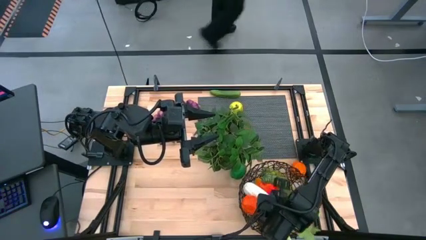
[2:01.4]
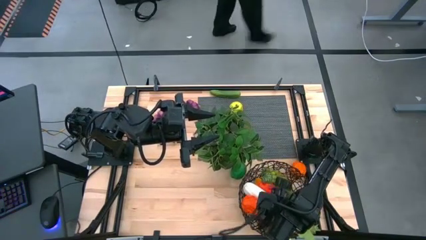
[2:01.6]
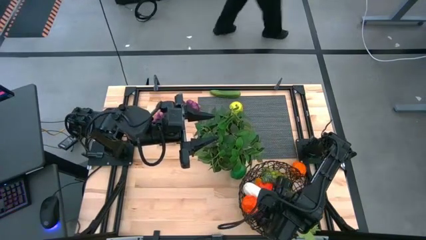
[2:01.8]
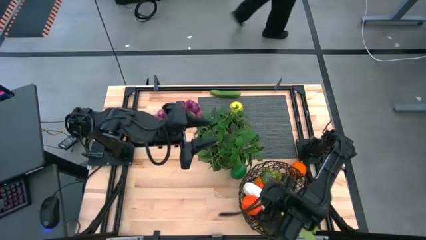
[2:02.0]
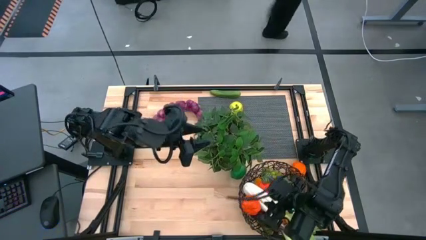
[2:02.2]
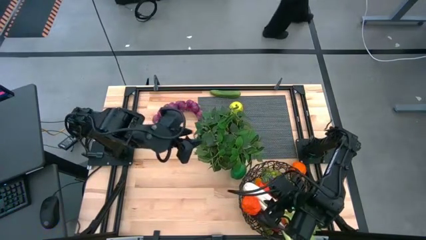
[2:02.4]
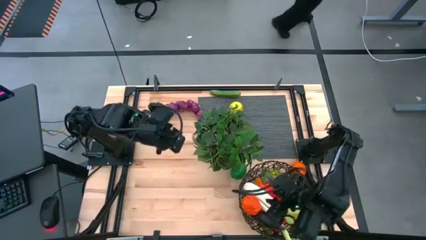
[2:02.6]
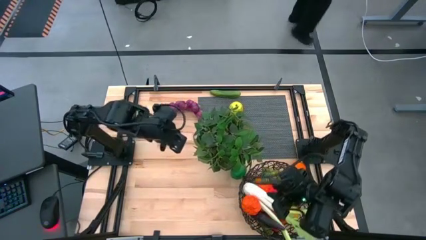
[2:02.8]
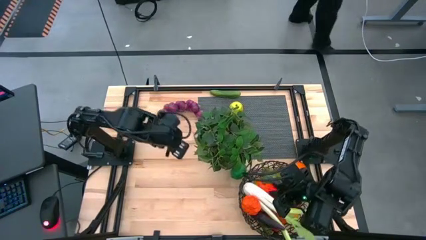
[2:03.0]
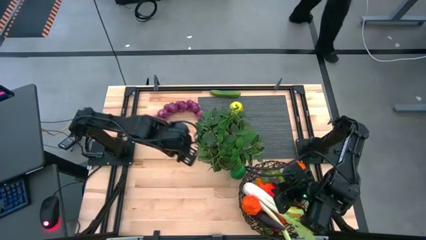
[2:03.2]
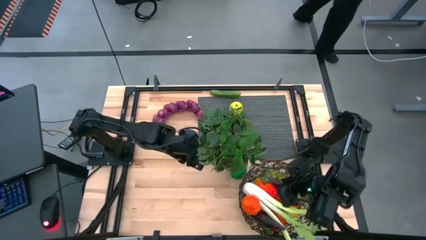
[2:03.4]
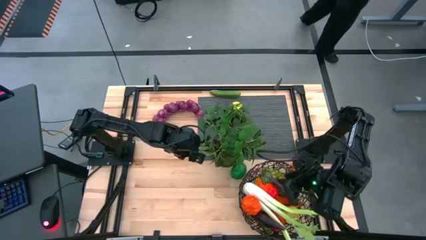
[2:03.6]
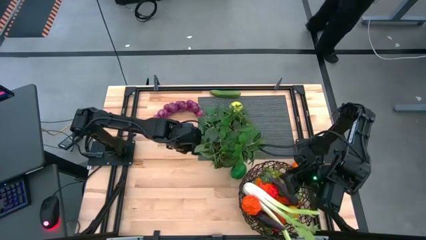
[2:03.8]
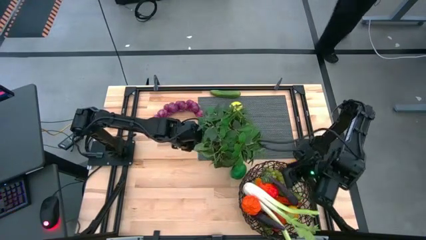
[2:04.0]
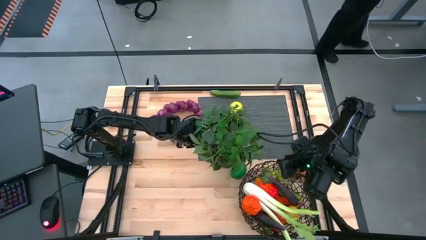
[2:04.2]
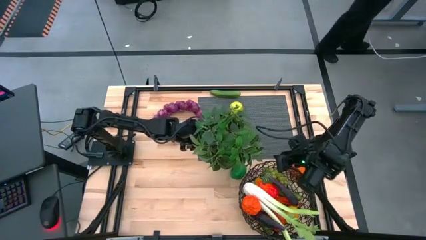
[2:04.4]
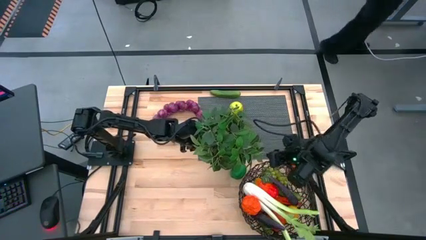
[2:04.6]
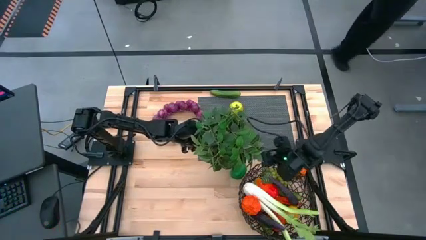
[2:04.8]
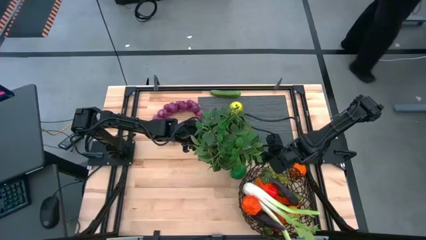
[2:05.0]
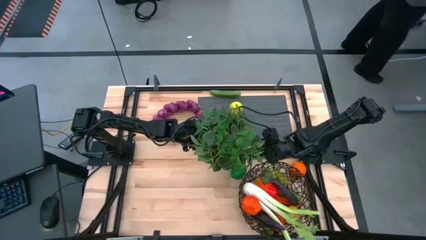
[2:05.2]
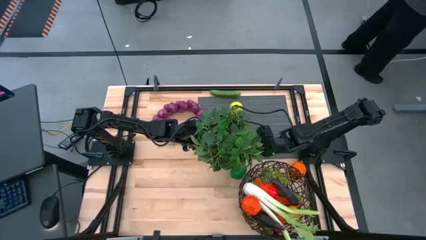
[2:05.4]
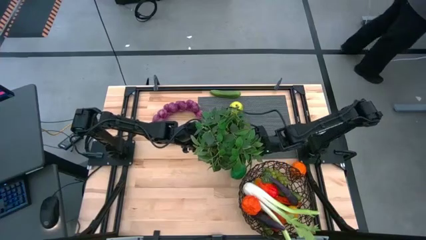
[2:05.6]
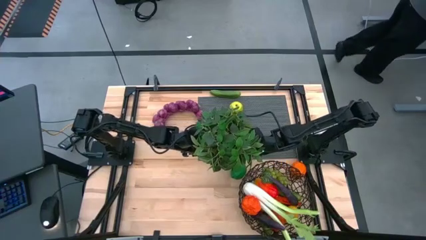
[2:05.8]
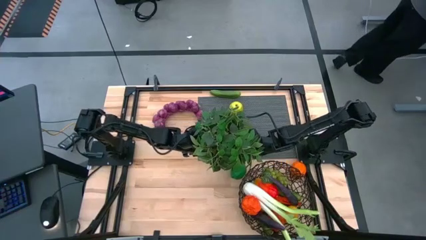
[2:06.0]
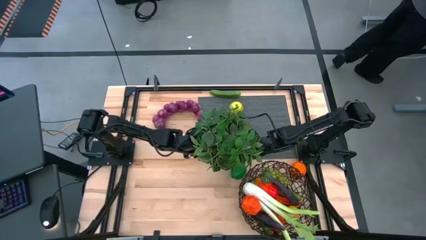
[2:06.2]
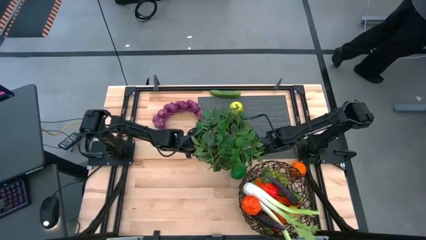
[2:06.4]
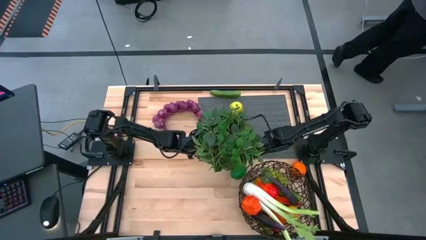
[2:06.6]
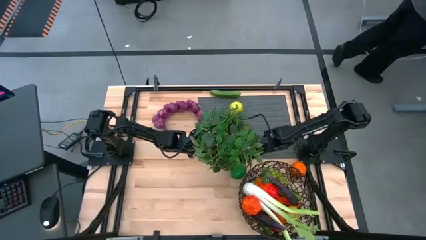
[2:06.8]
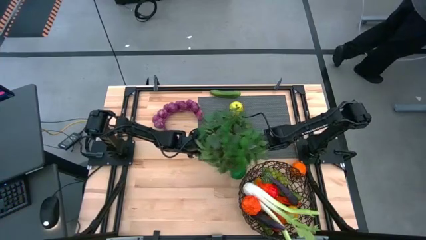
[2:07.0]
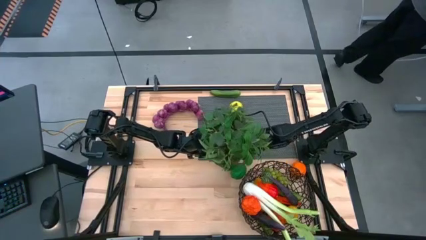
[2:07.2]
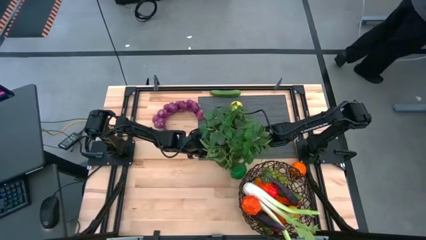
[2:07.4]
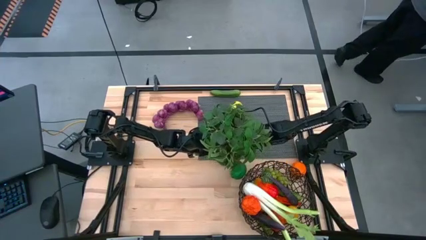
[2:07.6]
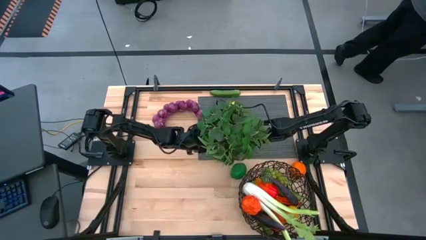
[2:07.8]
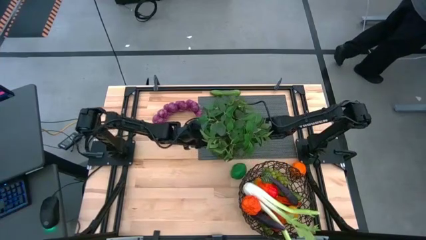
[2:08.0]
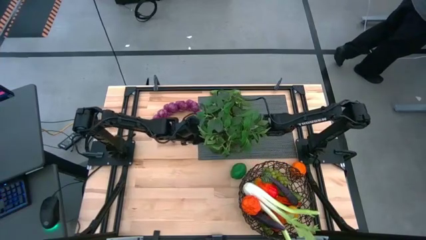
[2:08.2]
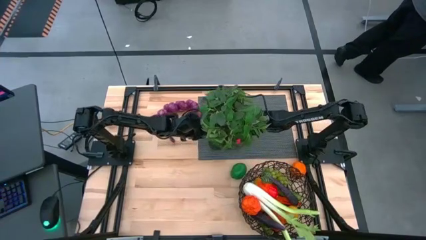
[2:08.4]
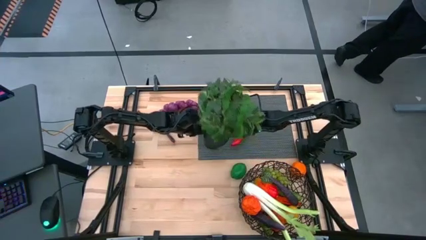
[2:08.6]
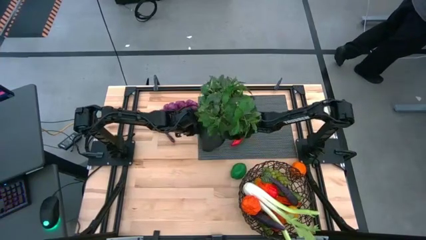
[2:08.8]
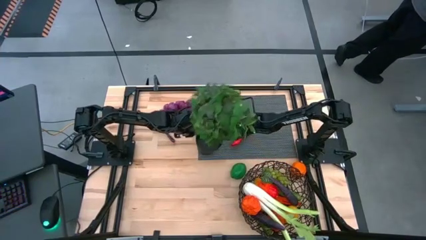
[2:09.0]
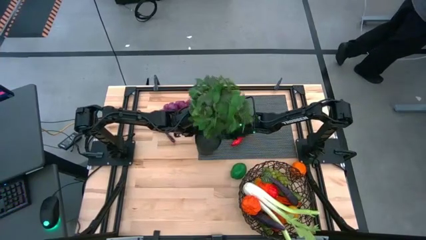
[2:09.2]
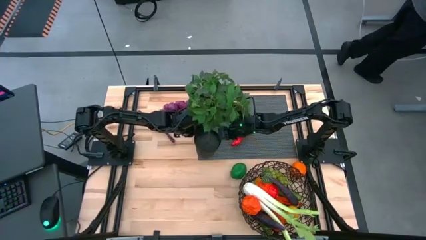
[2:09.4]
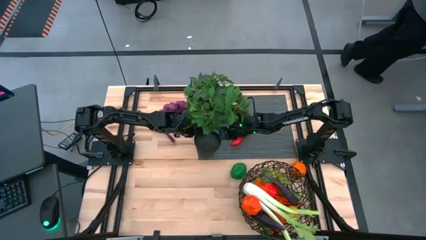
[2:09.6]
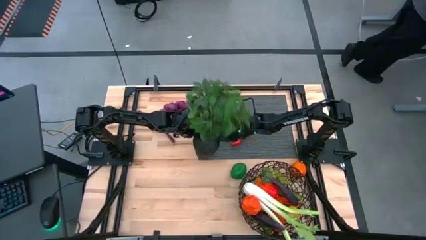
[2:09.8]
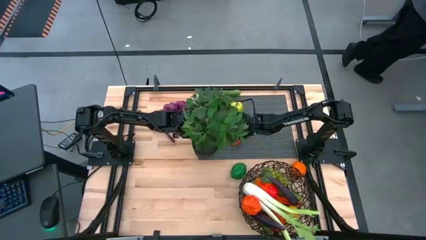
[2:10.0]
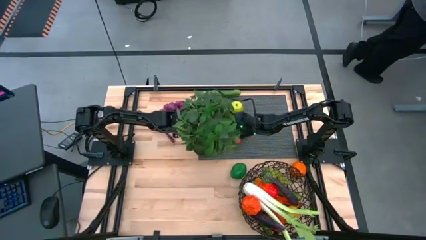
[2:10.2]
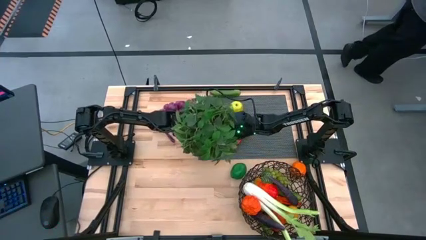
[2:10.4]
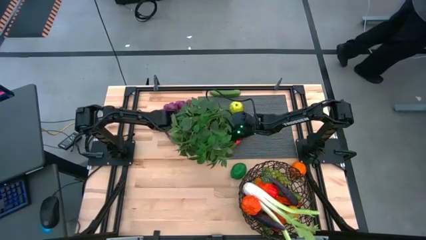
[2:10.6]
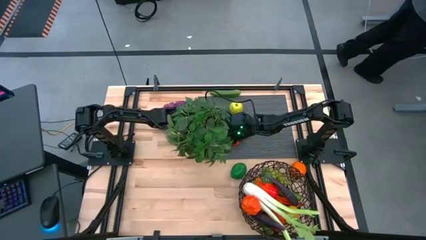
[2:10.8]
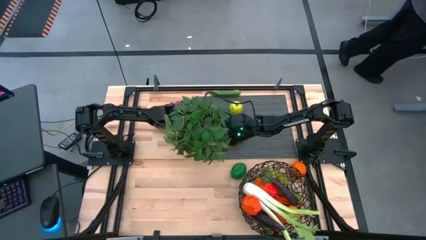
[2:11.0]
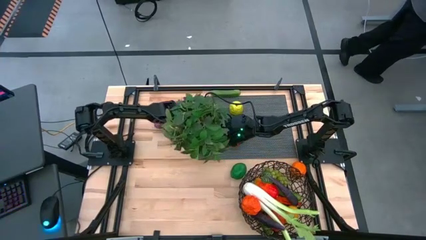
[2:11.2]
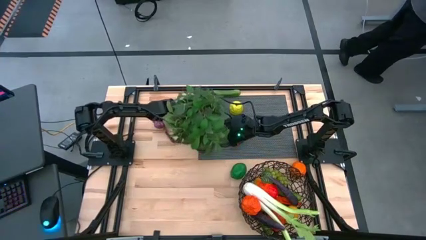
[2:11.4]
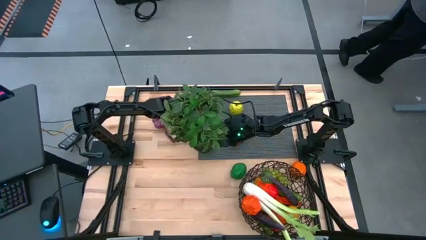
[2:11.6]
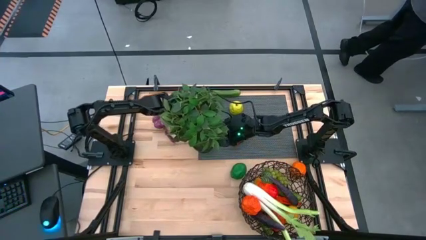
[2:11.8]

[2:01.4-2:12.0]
Task: Build produce basket
Move the pot plant to the center of the table

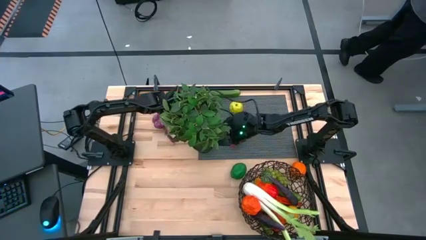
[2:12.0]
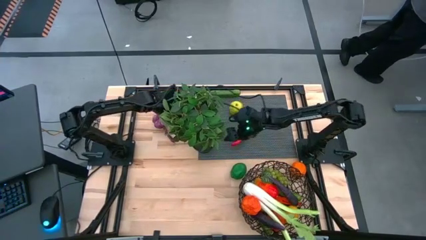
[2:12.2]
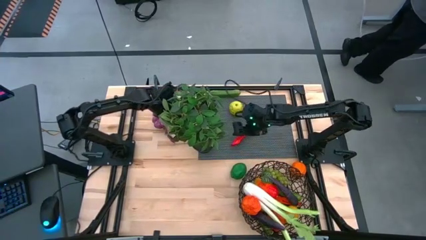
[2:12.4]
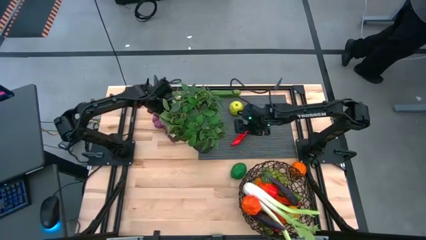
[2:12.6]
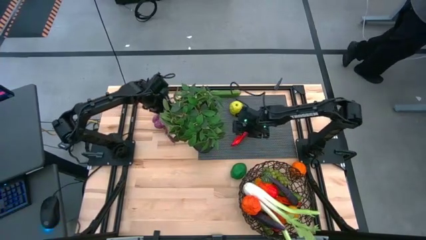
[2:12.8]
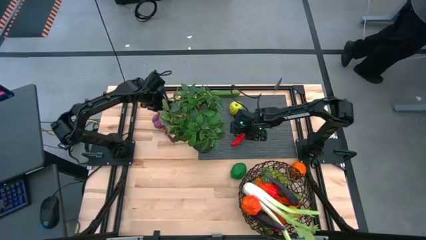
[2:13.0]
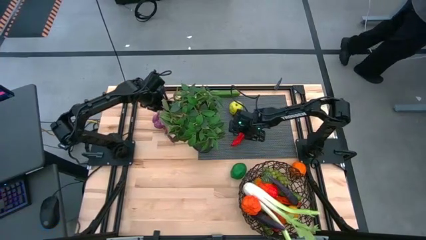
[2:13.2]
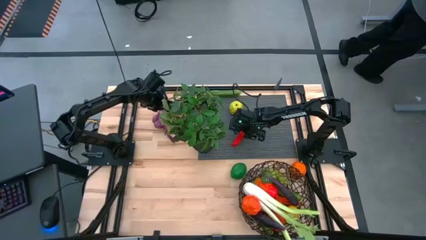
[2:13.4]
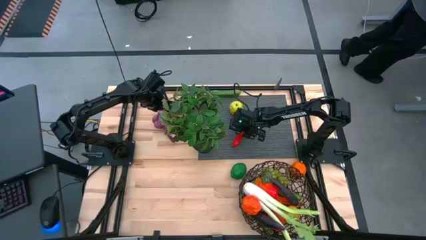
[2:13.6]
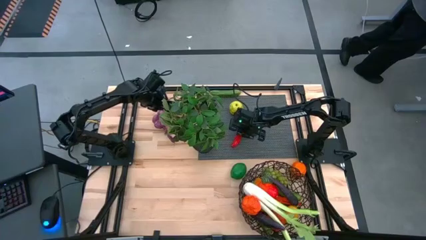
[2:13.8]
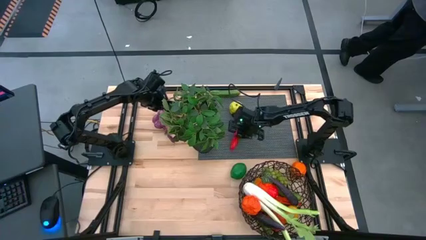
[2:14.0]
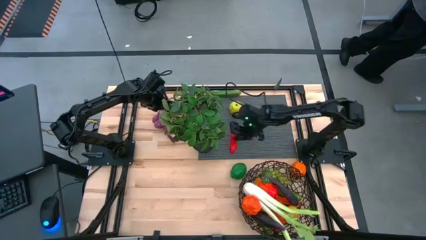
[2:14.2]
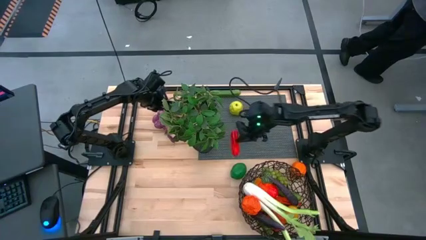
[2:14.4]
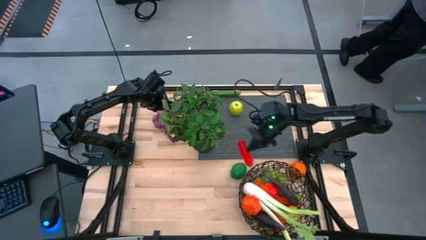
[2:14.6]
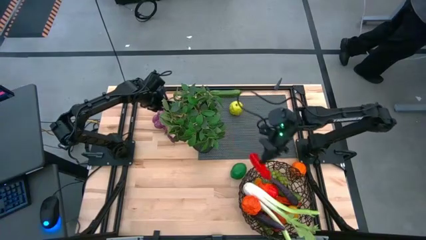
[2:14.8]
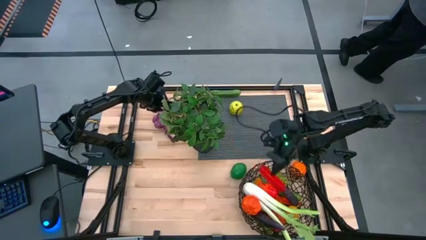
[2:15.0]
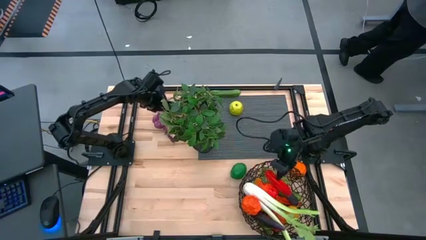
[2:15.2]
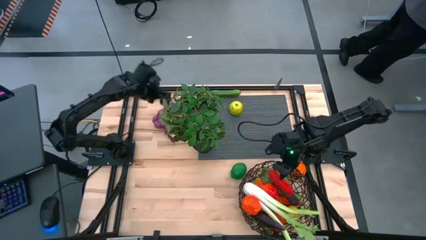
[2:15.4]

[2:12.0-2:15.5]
Put the red chili pepper into the brown wire basket

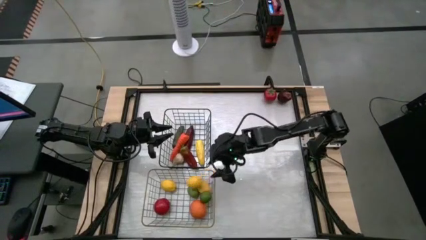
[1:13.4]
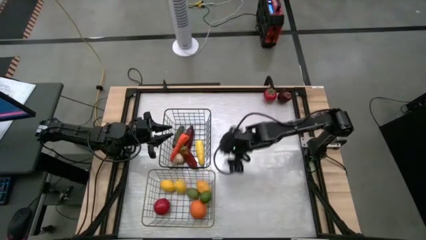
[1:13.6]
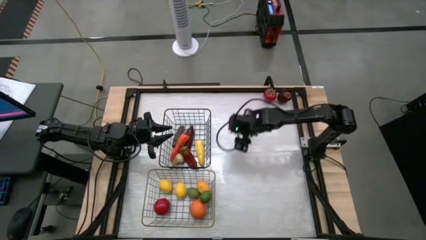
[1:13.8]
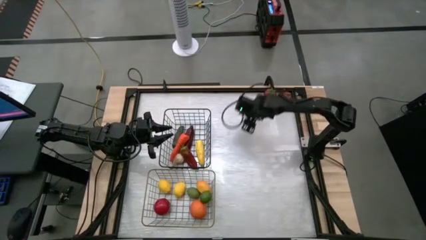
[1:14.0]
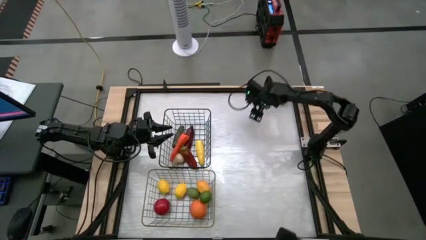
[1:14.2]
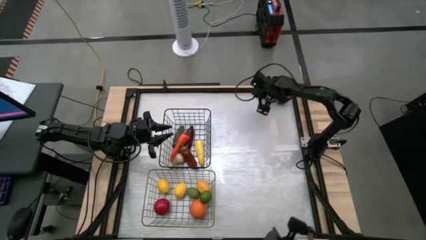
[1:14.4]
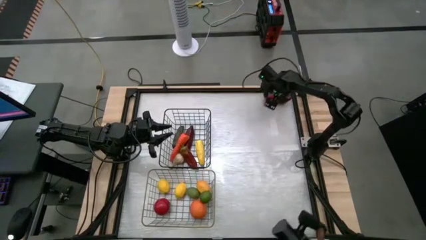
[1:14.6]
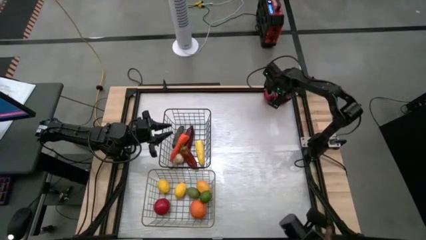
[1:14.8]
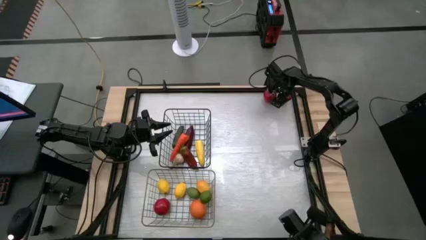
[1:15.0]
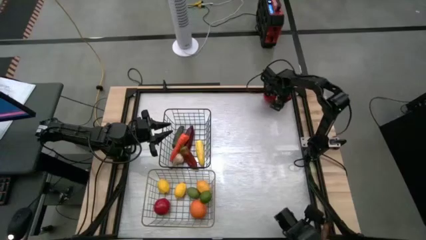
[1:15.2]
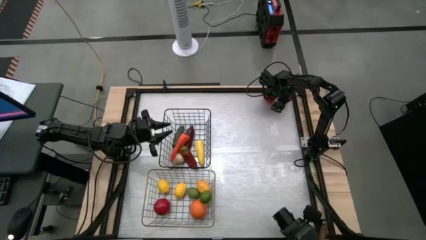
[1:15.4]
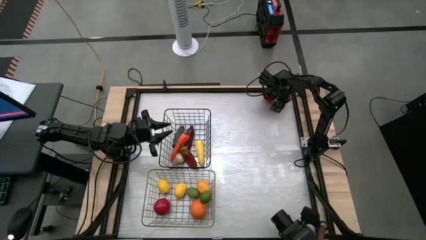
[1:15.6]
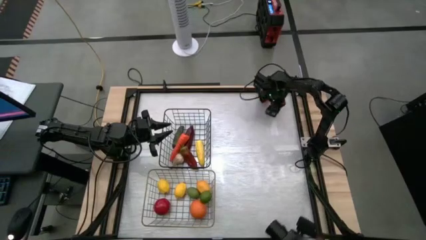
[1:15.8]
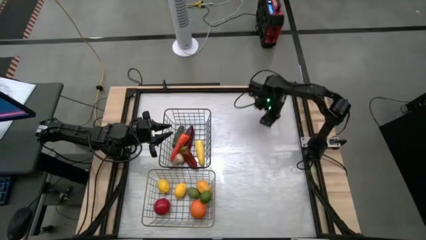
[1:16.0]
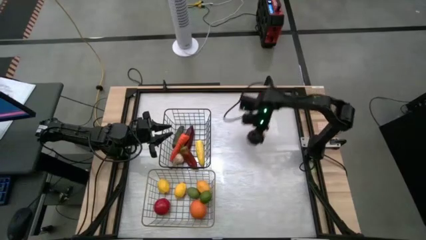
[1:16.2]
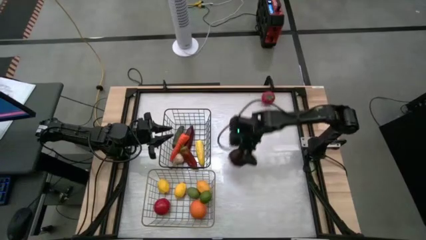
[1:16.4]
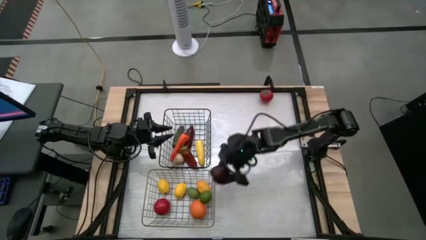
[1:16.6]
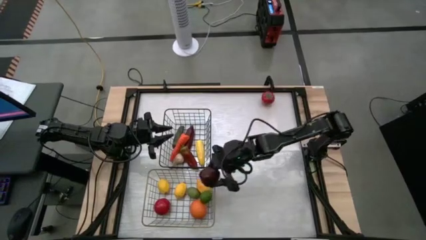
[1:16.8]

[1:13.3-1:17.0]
Task: Sort produce into baskets
Put the apple into the silver wire basket
